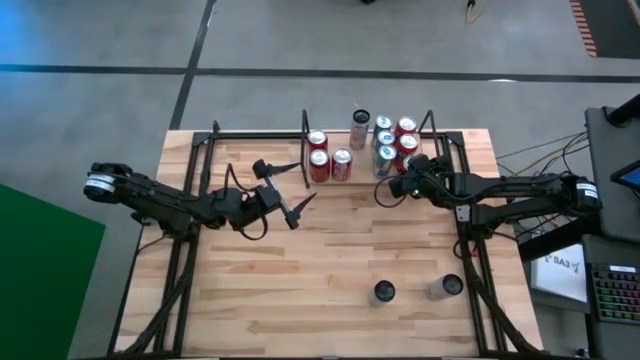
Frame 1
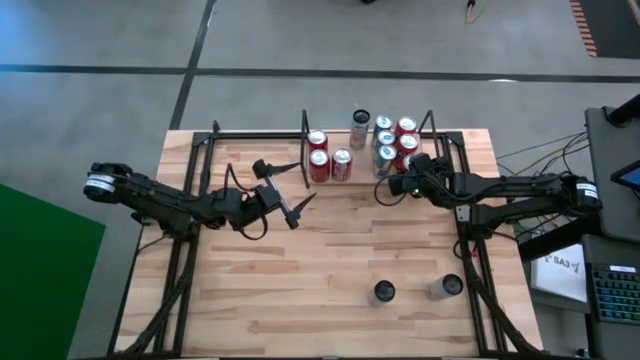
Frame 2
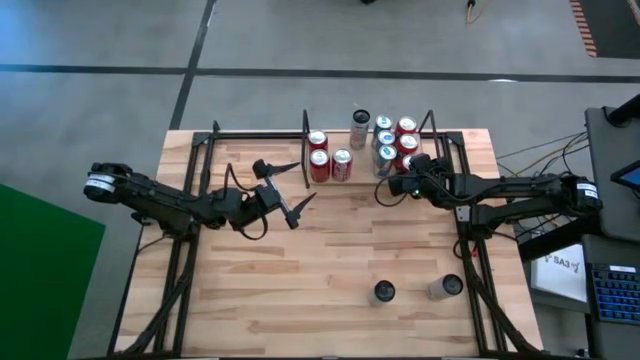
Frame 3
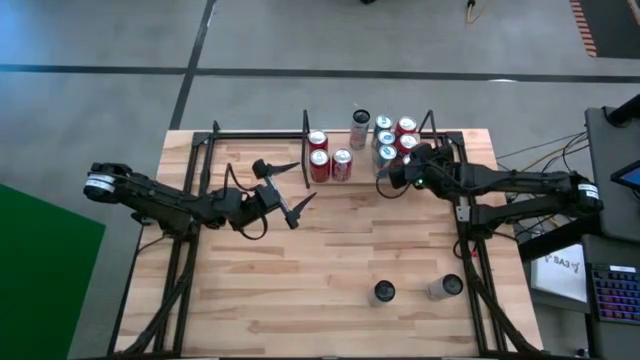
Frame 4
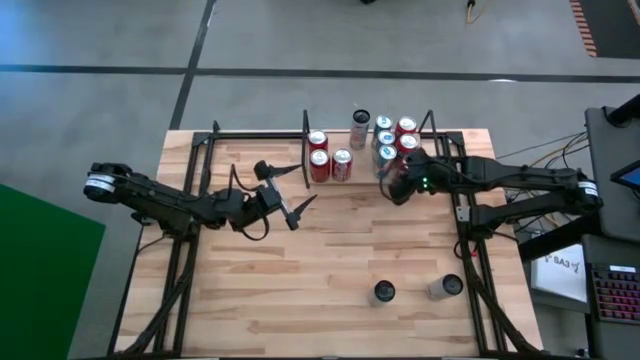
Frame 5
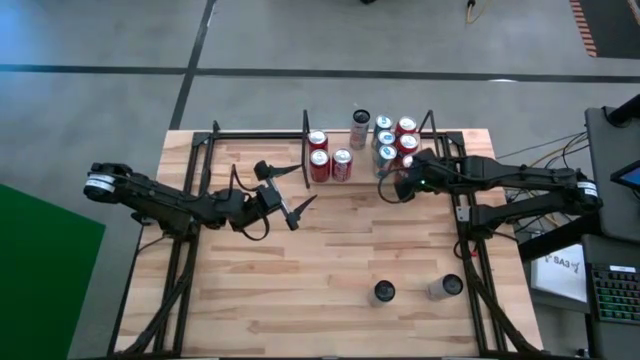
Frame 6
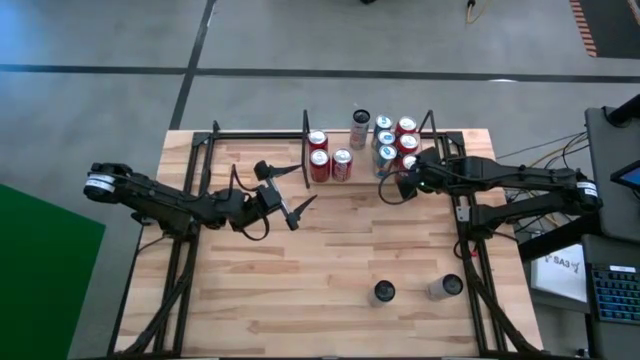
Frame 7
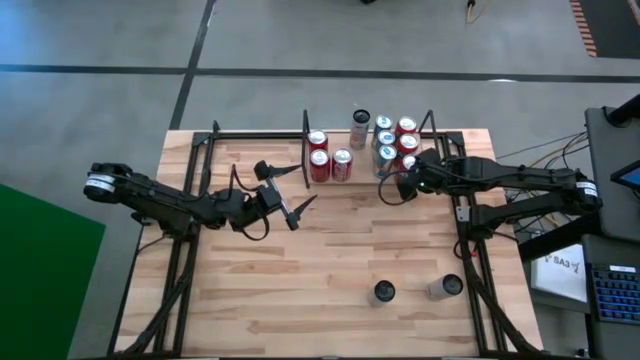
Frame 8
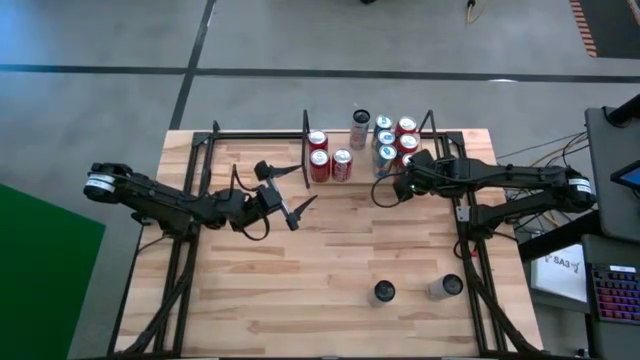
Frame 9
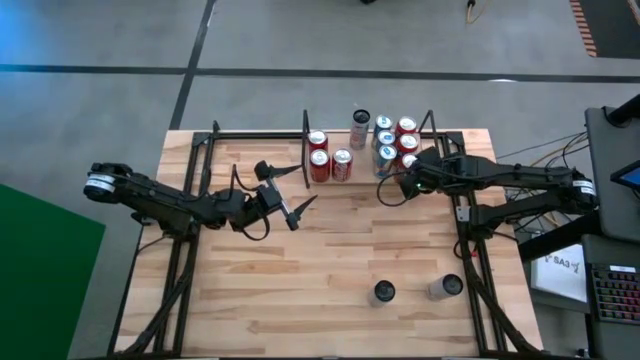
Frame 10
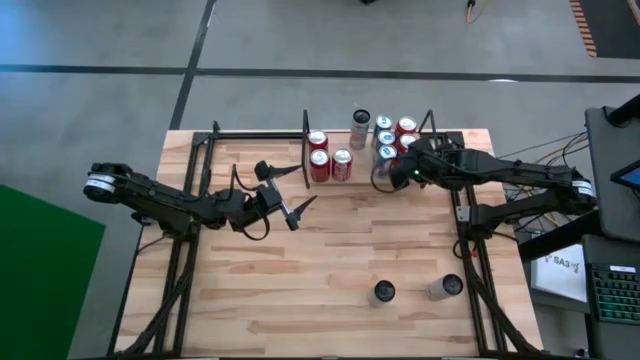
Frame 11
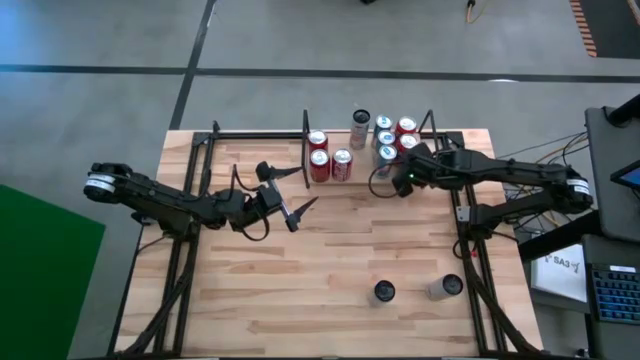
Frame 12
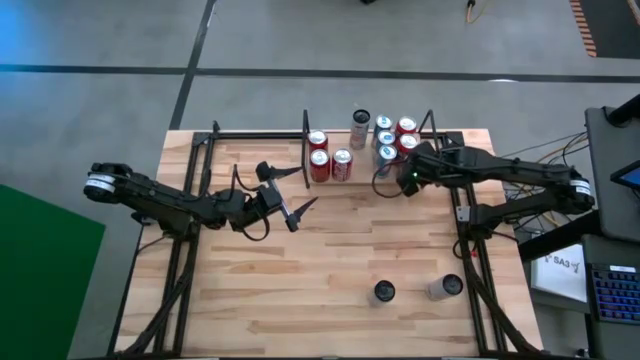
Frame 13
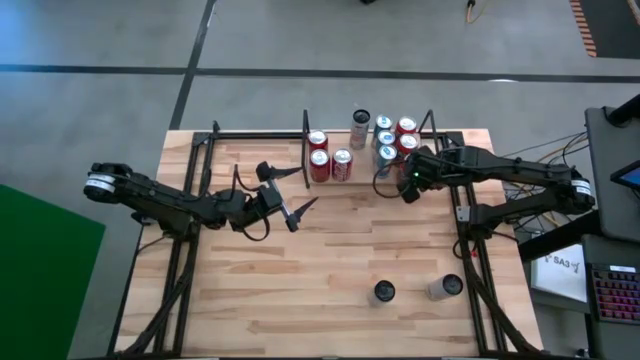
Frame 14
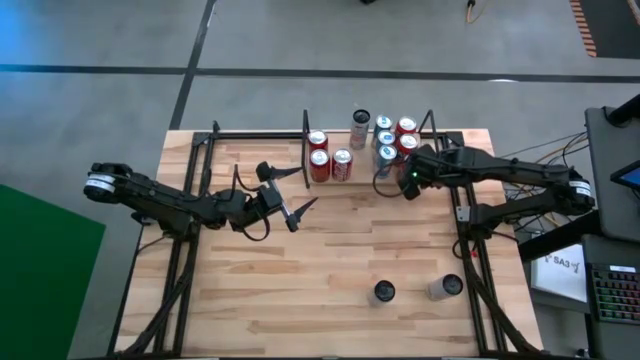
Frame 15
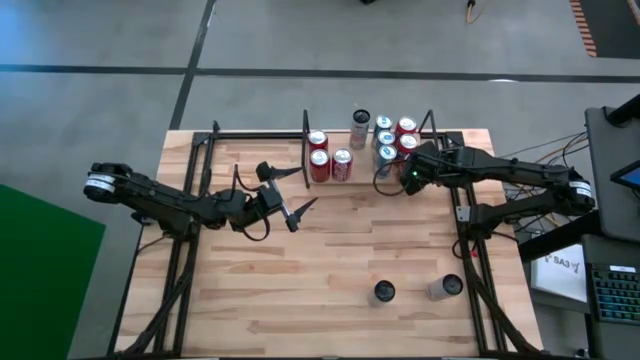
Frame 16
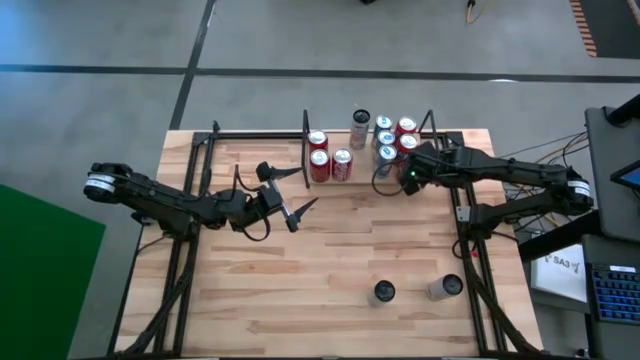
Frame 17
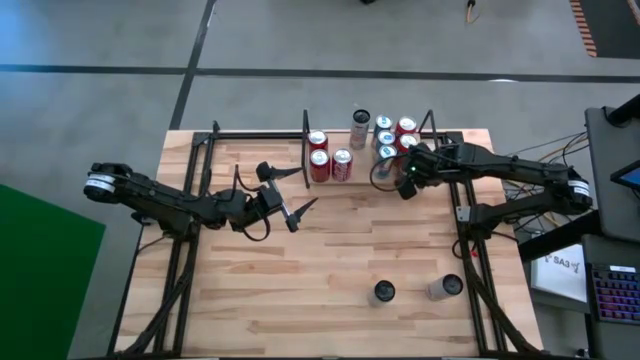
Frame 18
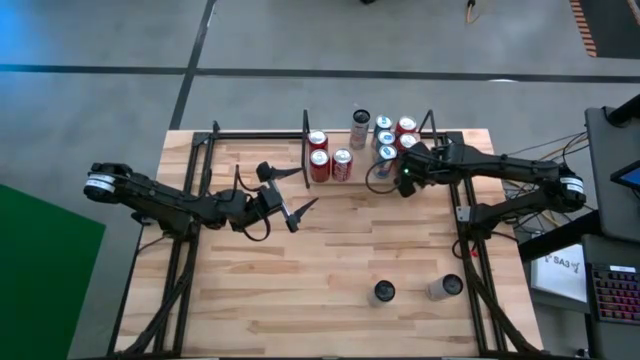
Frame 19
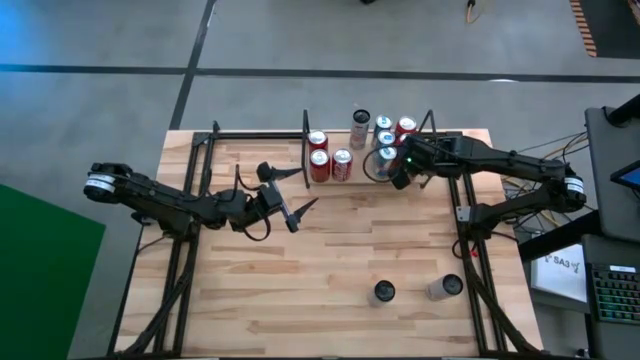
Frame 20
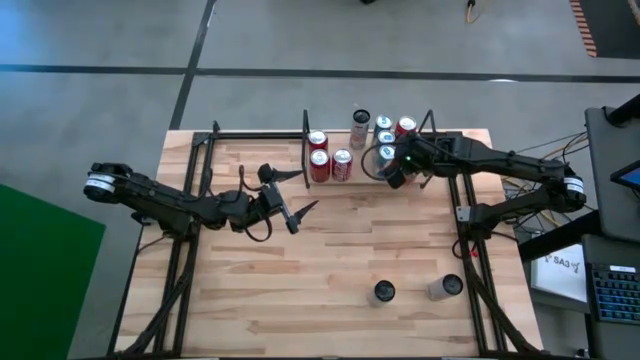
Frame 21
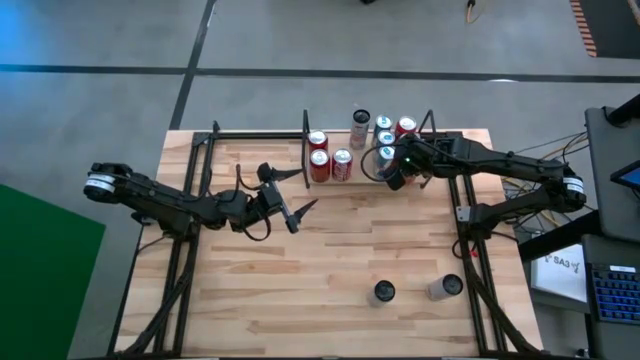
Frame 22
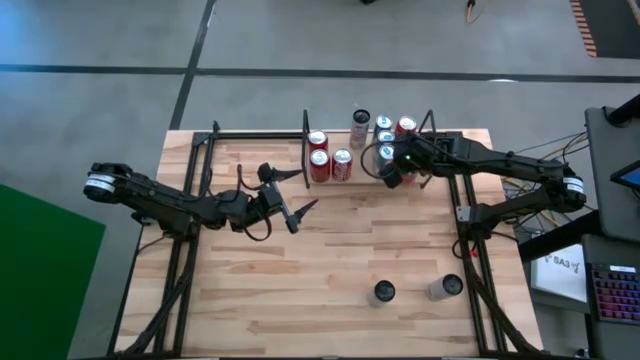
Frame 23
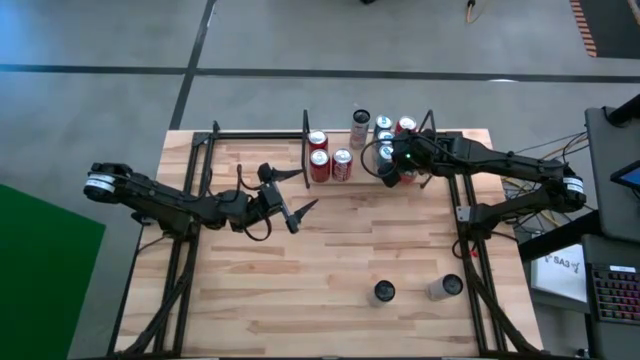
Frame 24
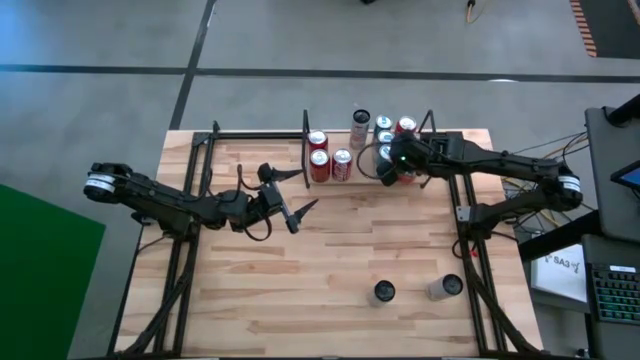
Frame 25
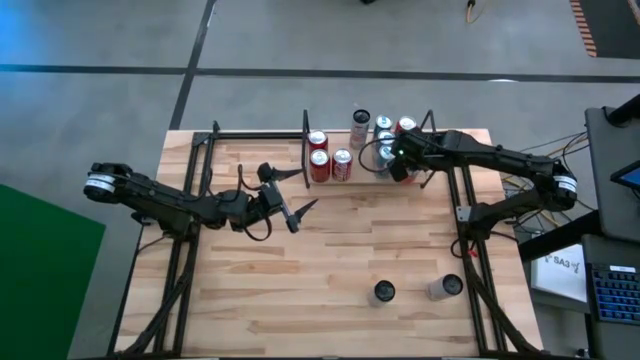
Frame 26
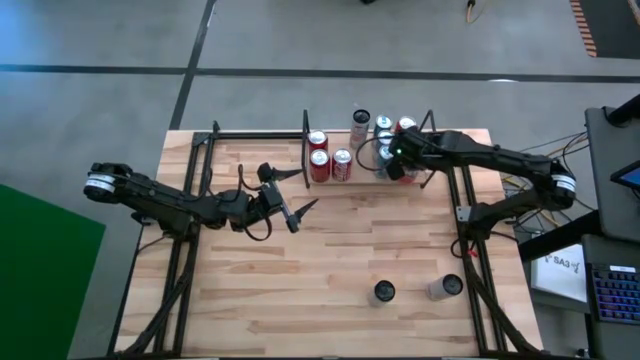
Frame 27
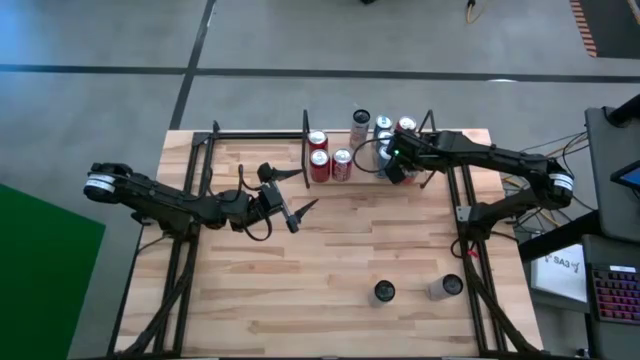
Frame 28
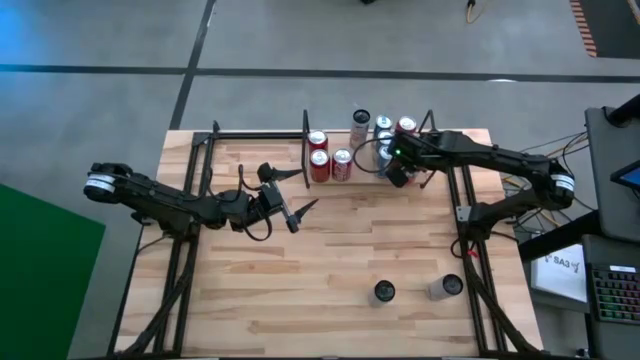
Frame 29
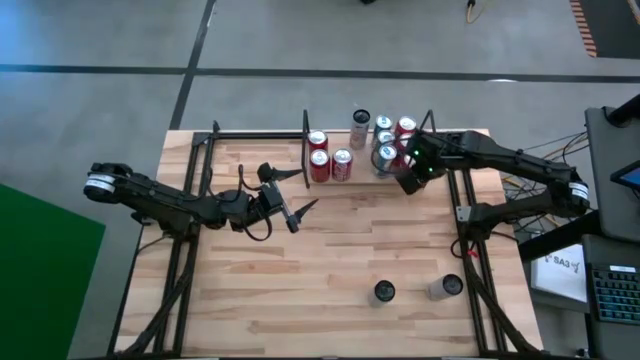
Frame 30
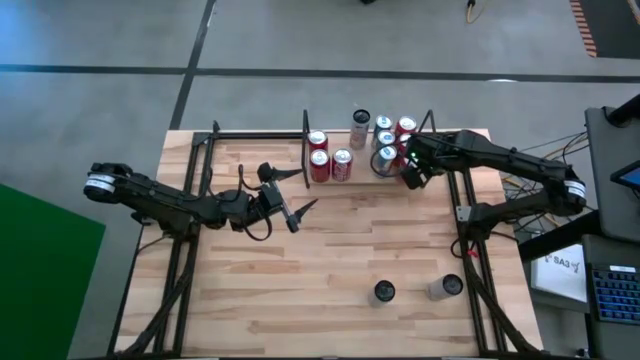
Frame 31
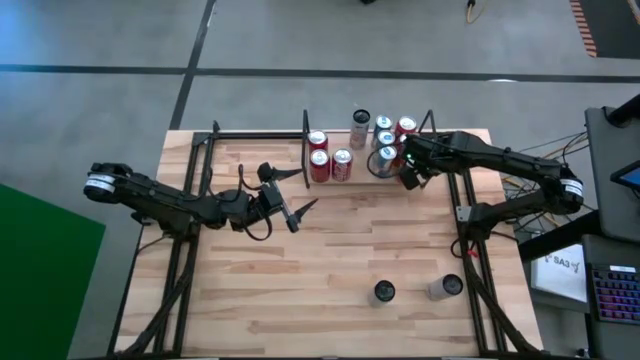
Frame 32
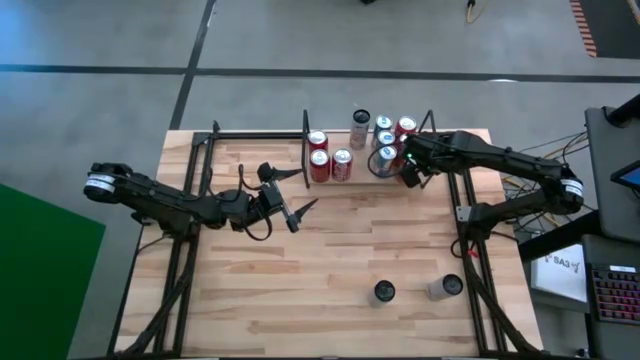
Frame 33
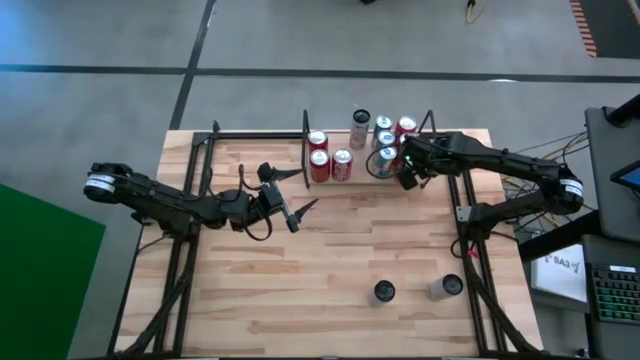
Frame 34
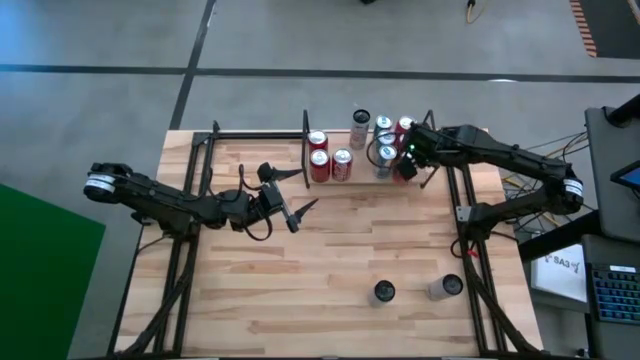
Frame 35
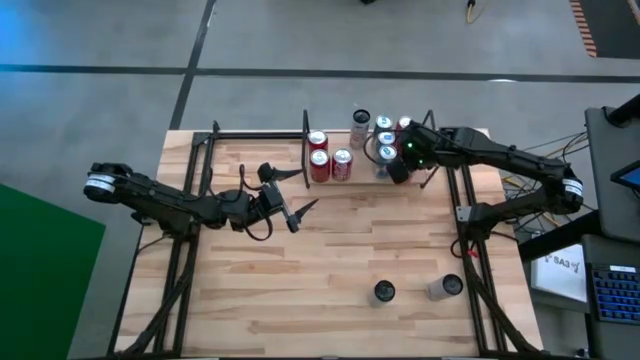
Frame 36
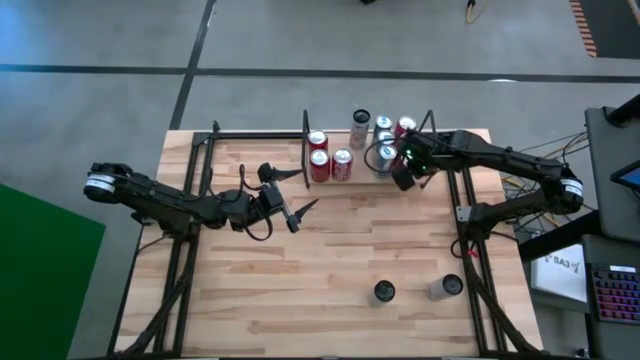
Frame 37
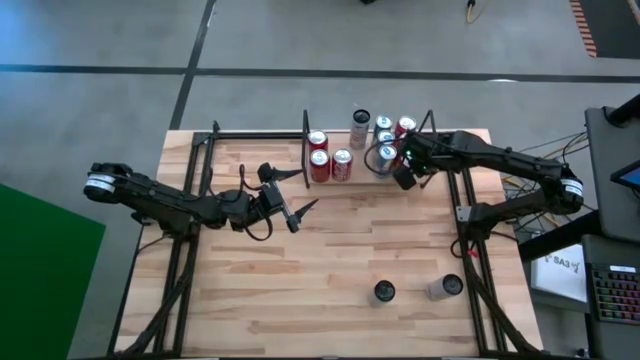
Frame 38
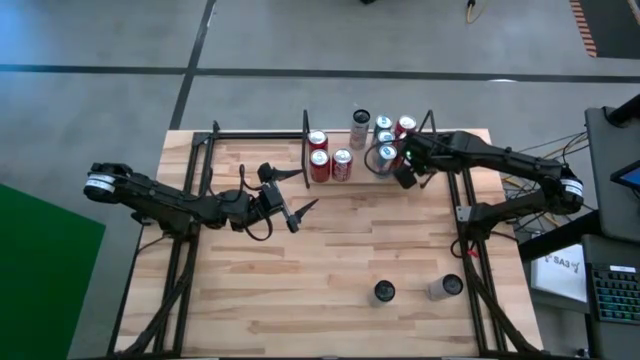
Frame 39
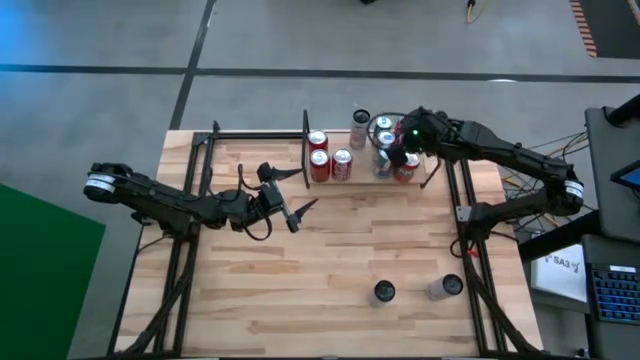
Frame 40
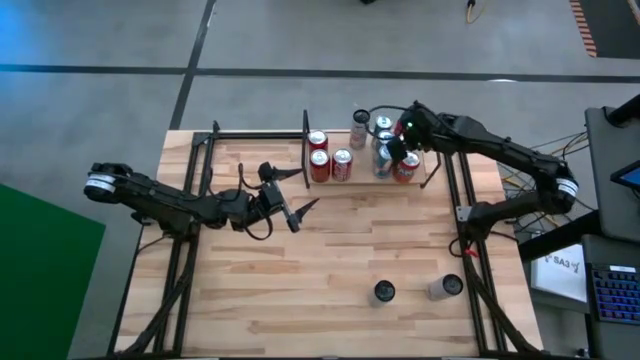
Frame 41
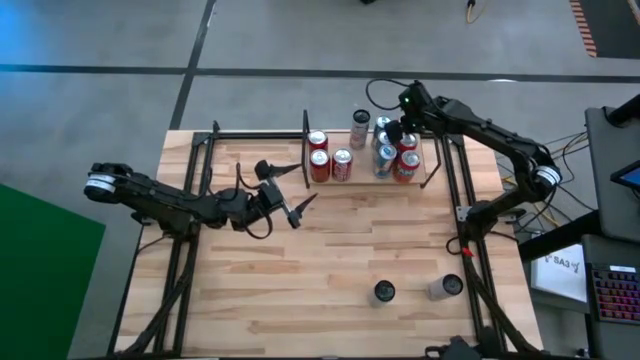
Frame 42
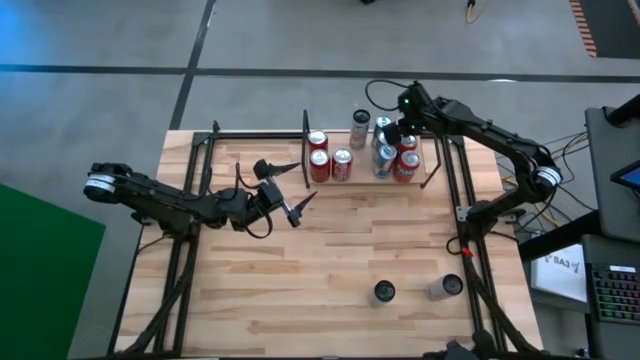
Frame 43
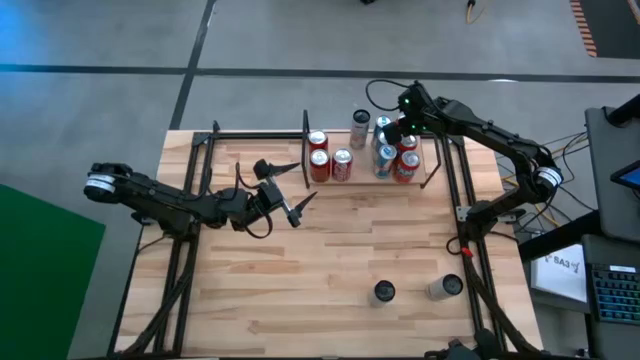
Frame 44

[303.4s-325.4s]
Task: Place canned beverage on shelf
Put the red soda can on the shelf
